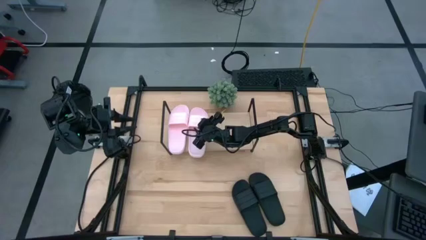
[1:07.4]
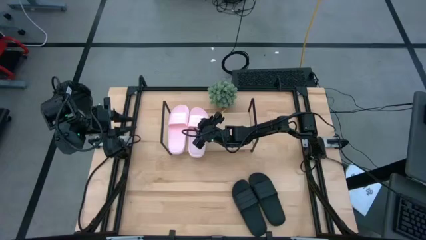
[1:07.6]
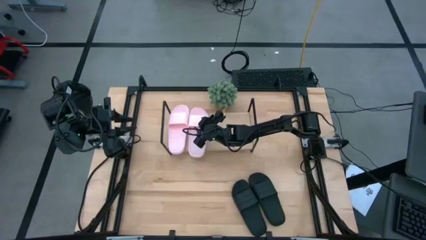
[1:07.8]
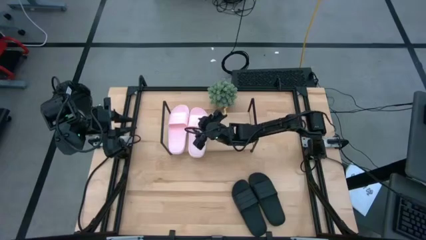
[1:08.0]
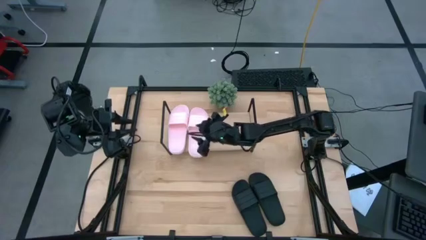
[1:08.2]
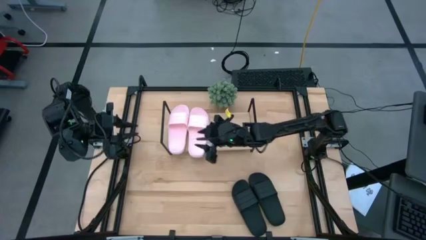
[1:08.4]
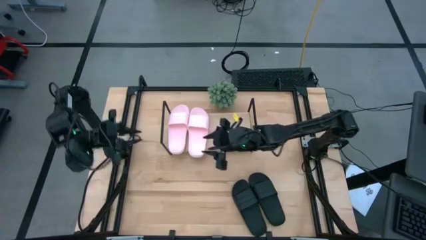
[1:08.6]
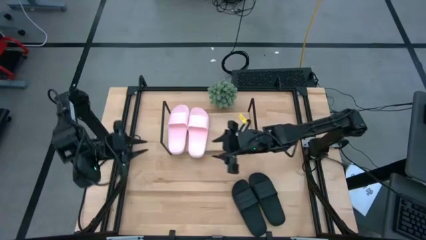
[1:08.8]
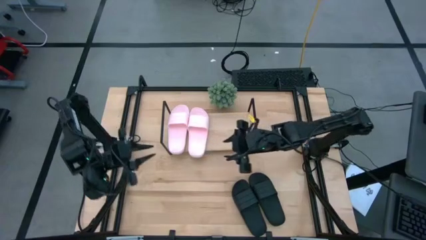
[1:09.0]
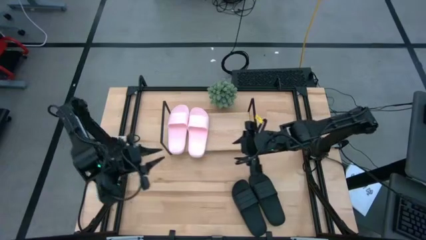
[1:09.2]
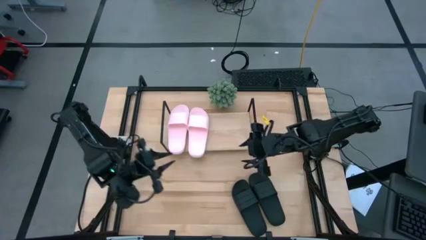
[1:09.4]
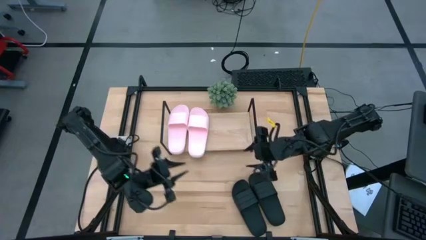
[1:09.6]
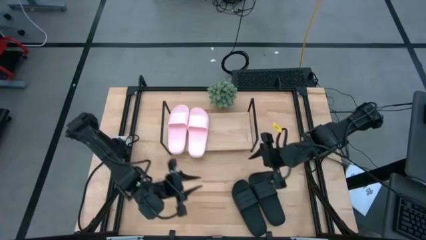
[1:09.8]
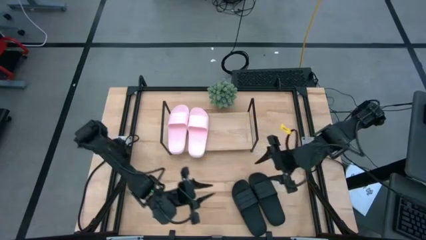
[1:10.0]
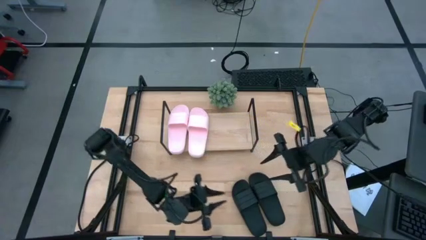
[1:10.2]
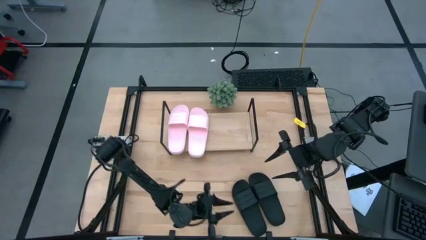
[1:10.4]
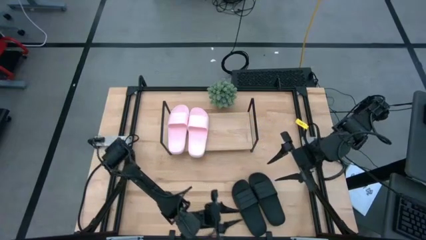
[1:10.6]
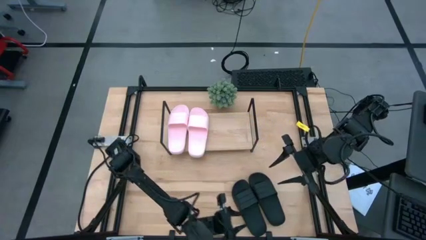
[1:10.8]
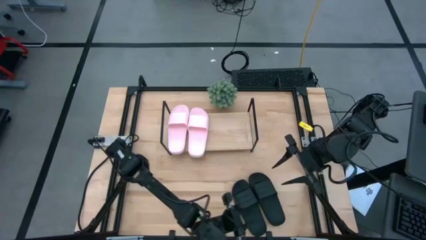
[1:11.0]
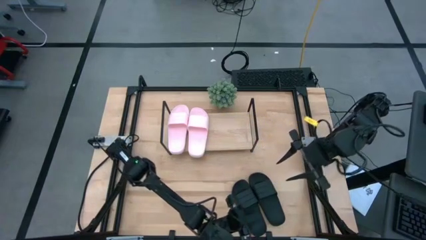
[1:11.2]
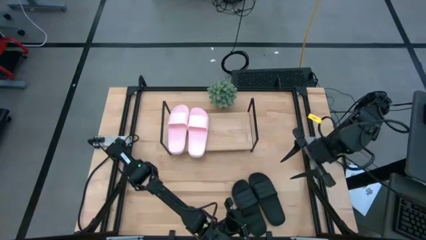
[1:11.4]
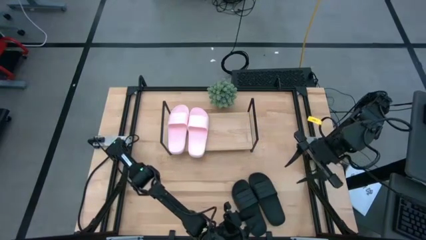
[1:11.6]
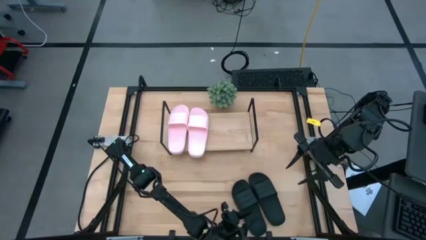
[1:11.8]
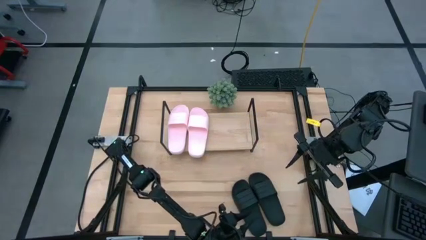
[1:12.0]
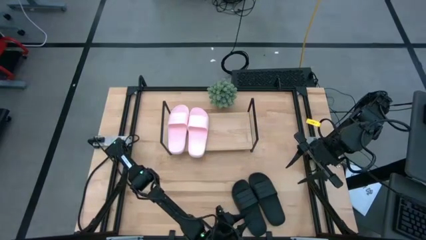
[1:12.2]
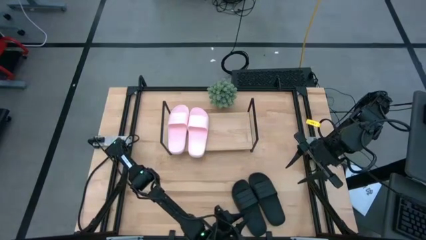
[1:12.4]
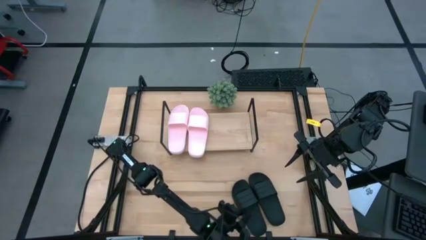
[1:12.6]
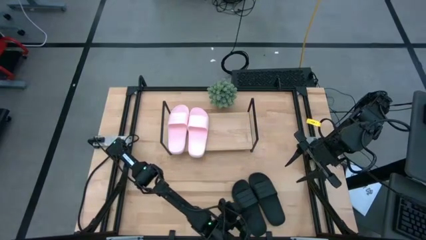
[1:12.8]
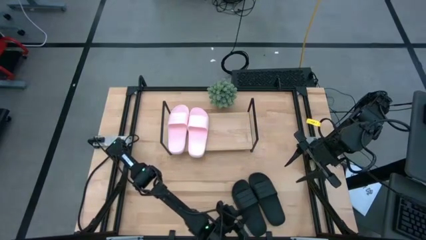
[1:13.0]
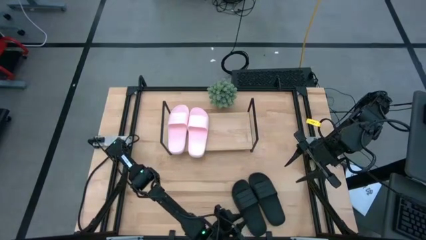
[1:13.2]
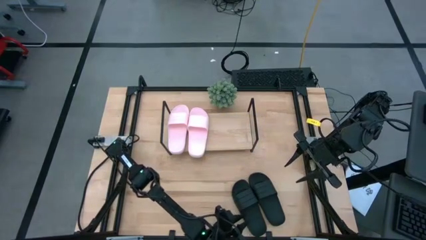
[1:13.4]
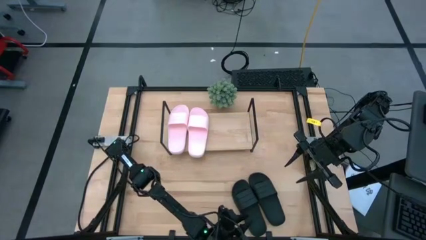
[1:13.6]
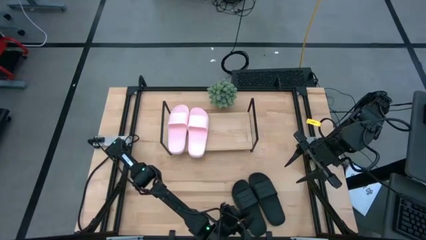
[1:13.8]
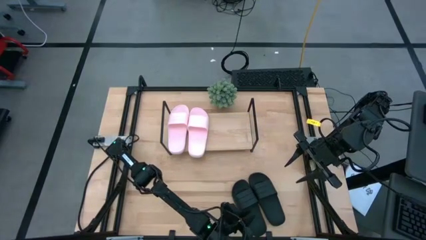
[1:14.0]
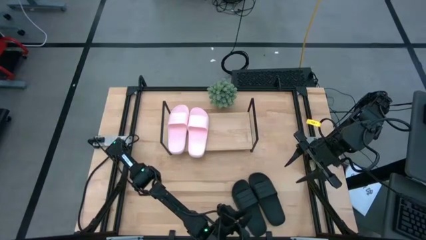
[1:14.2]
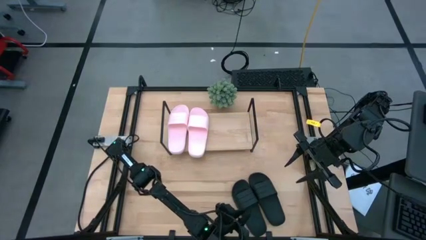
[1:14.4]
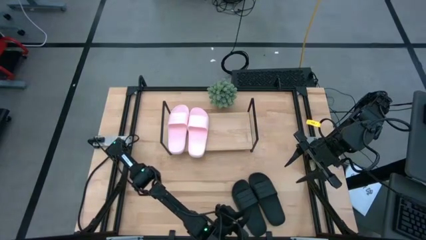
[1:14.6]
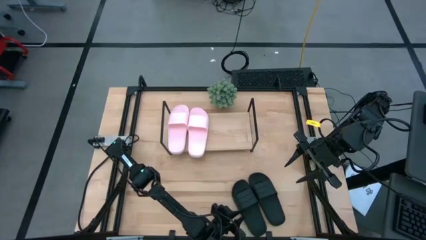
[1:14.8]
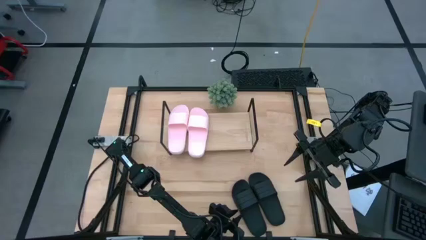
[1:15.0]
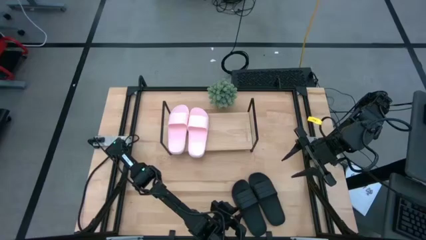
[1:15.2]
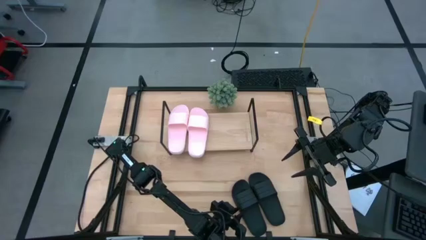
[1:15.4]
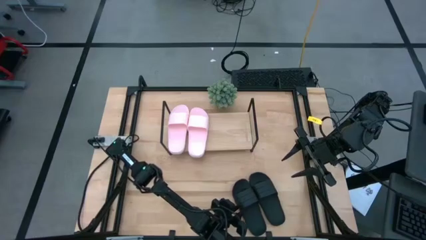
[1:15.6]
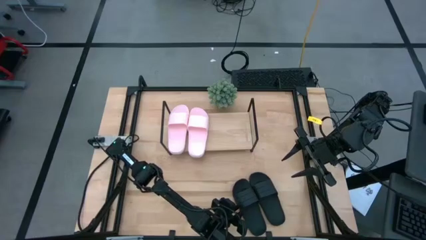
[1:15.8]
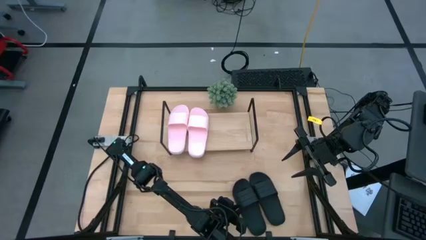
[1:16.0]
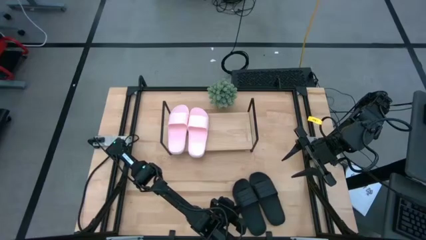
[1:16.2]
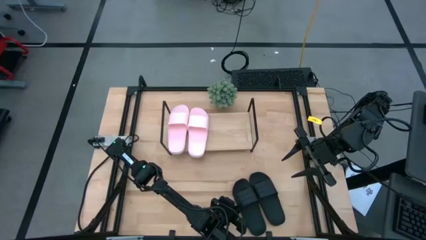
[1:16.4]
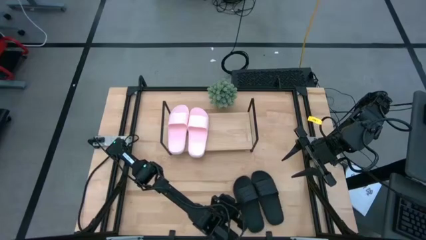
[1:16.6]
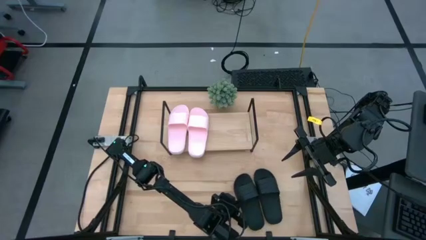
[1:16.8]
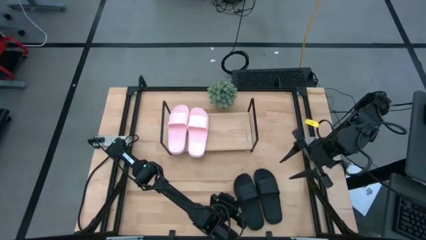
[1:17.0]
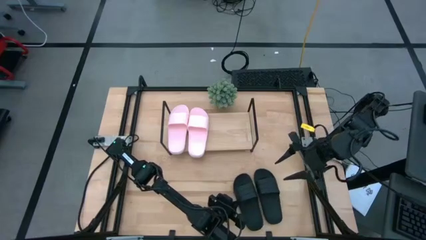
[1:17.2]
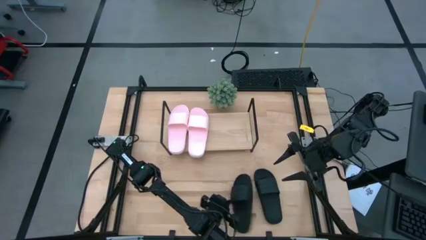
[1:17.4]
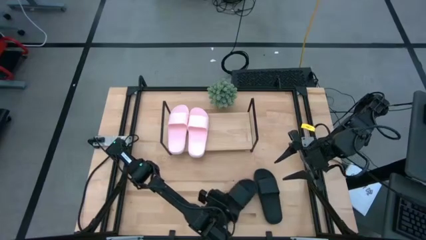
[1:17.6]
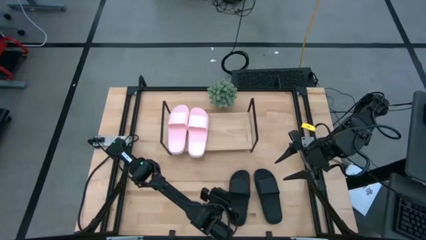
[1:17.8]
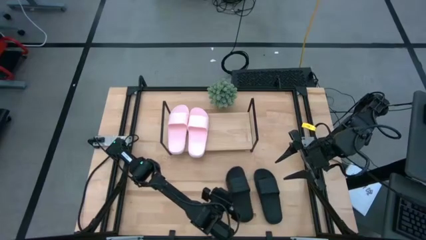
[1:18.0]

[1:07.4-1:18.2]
Task: Pick and place slides into the shelf
Put the black slide on the shelf

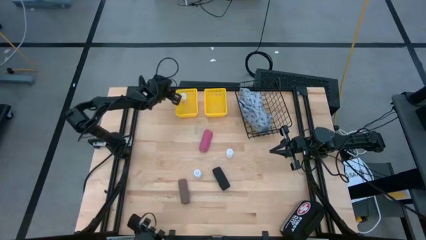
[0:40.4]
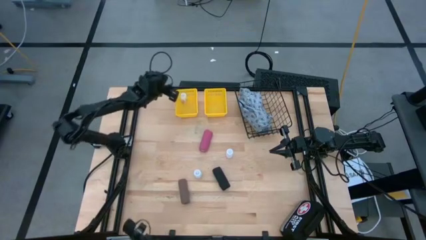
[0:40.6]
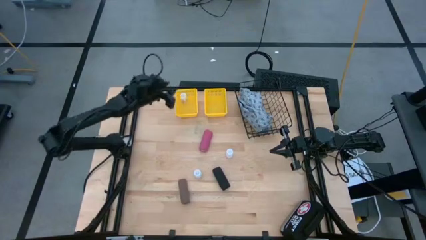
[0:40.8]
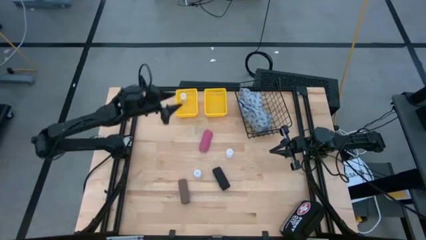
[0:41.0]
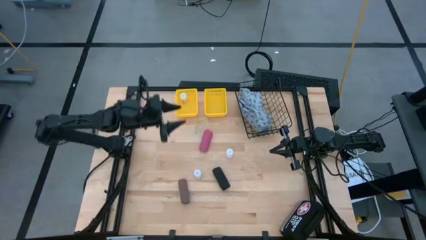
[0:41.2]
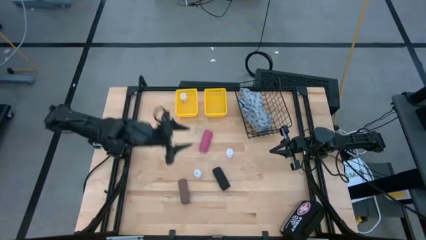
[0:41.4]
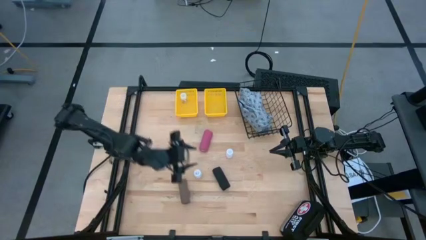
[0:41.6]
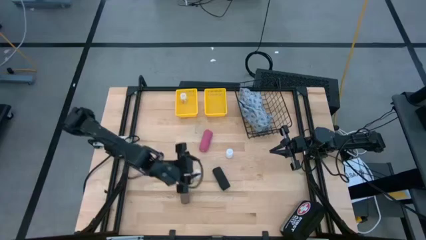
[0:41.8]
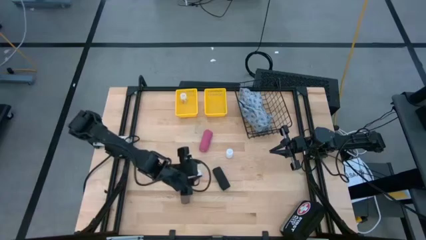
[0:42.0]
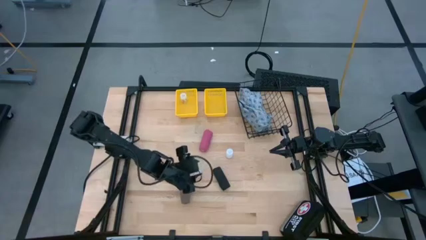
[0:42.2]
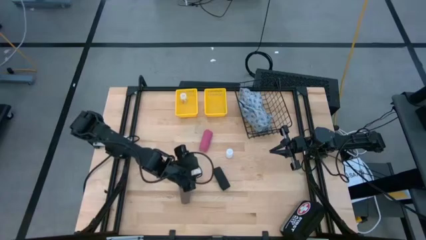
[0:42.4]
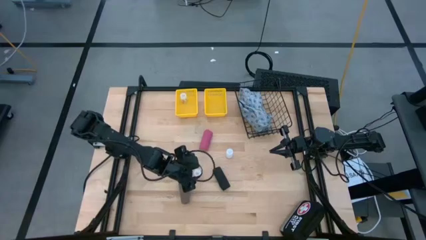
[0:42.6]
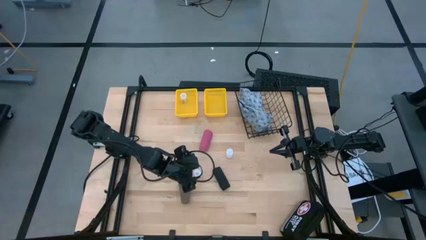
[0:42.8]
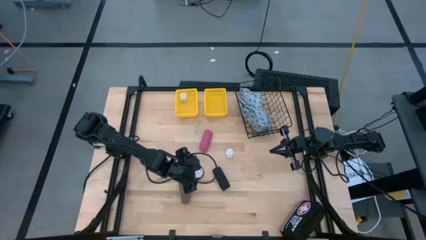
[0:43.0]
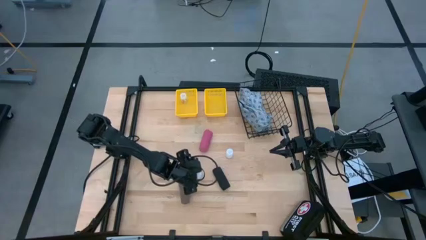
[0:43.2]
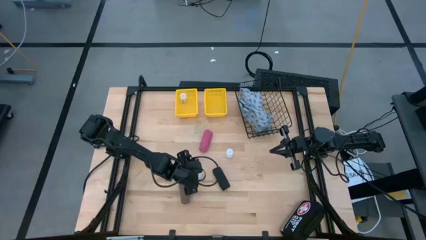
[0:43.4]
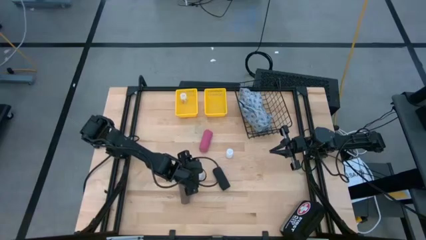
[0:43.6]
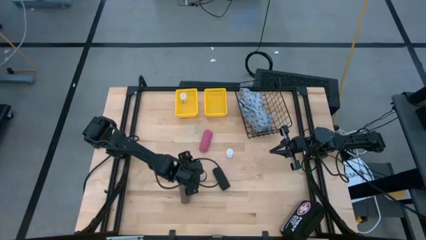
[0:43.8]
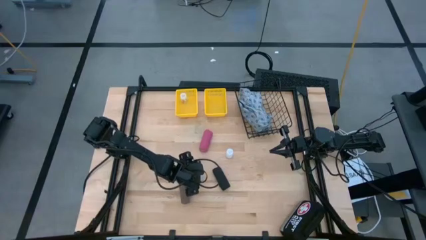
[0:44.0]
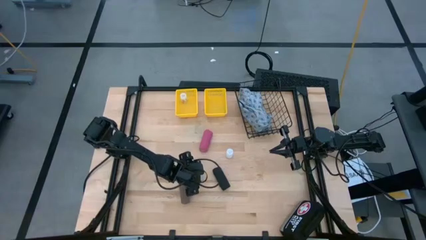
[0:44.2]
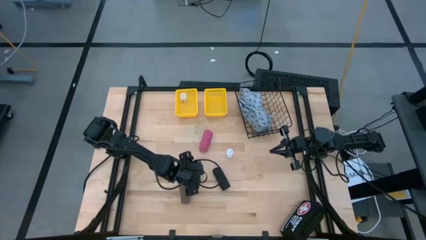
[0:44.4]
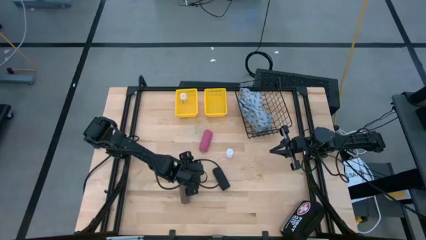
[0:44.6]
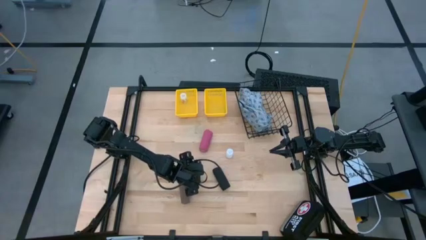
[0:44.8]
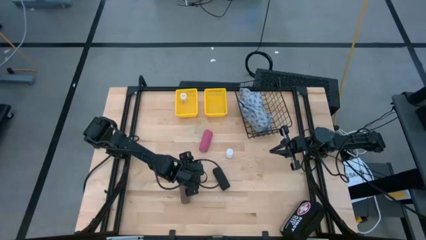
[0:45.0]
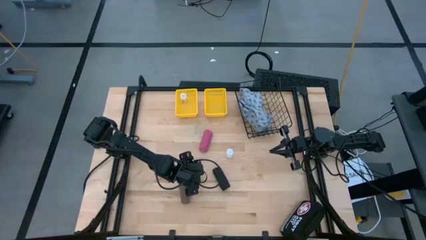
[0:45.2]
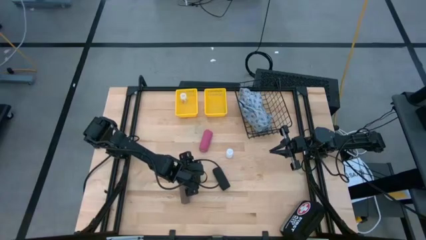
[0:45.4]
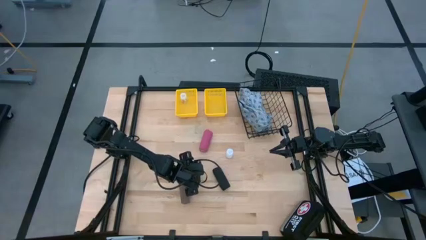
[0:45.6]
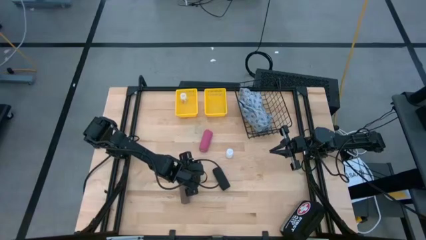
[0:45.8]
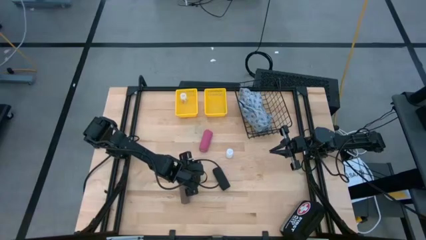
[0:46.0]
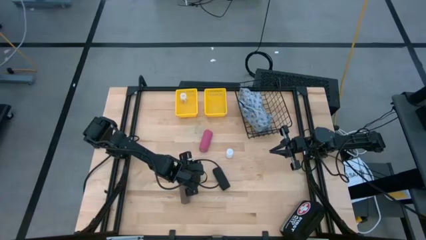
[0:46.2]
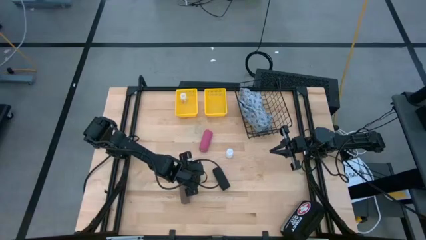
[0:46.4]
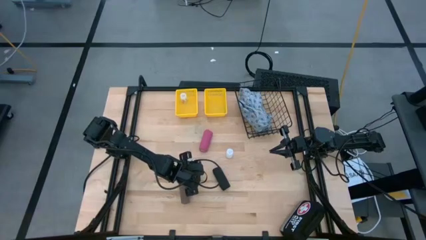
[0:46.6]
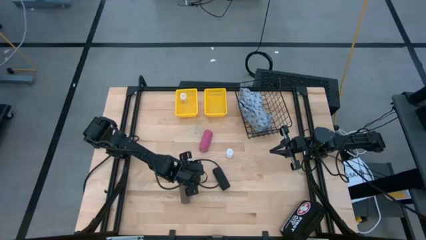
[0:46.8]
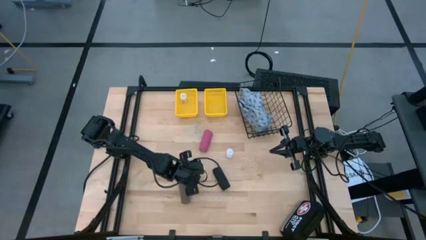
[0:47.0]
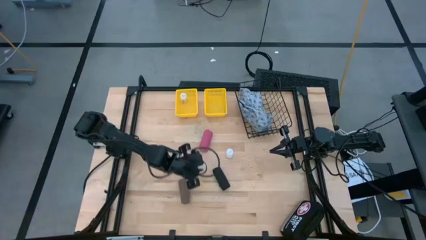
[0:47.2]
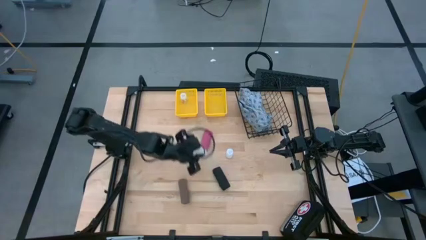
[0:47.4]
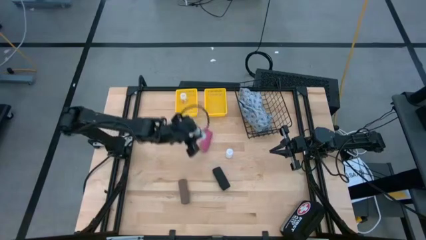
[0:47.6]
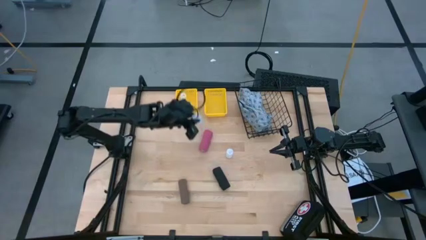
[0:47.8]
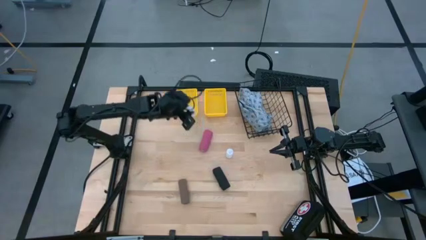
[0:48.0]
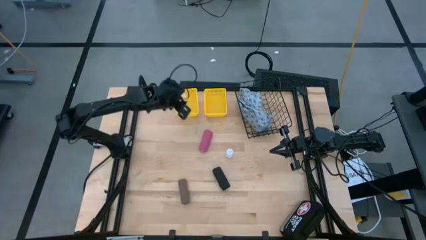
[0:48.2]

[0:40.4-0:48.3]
Task: Pick & Place Medicine items
Put the left pill bottle into the left yellow basket
